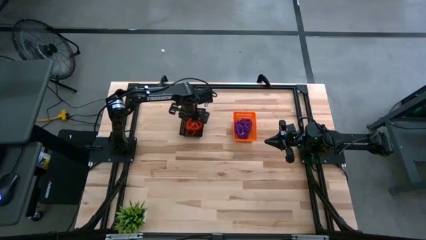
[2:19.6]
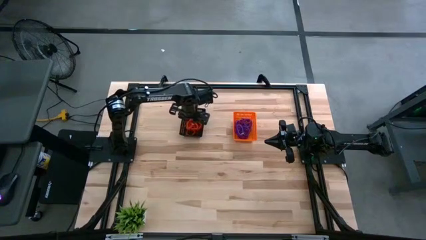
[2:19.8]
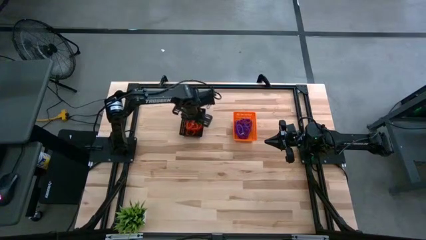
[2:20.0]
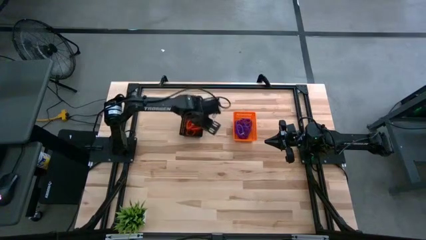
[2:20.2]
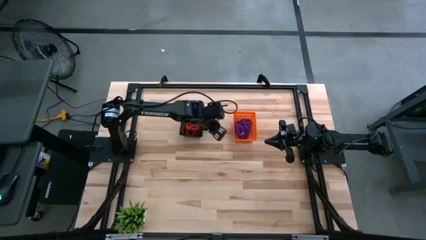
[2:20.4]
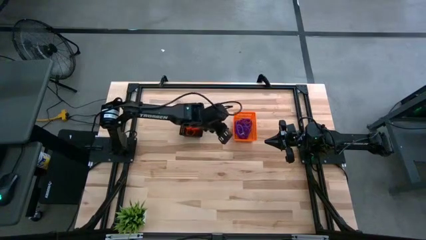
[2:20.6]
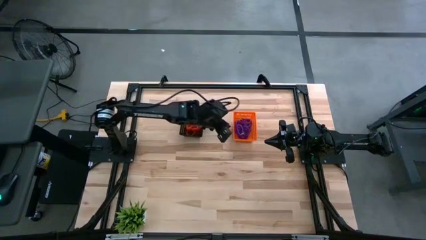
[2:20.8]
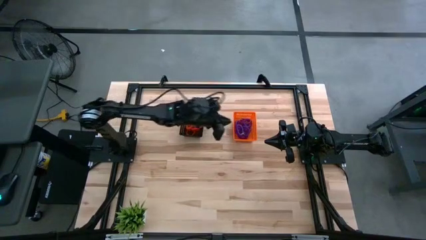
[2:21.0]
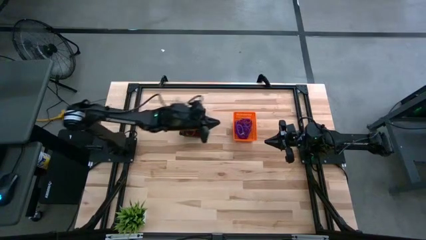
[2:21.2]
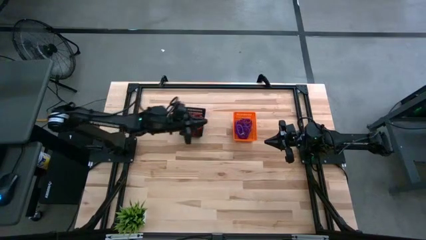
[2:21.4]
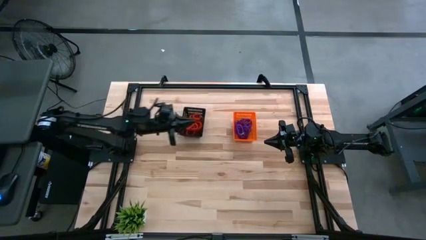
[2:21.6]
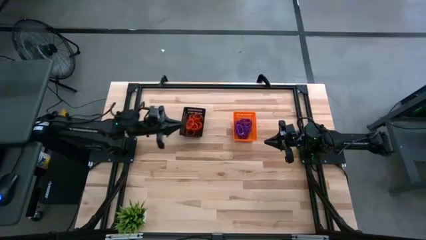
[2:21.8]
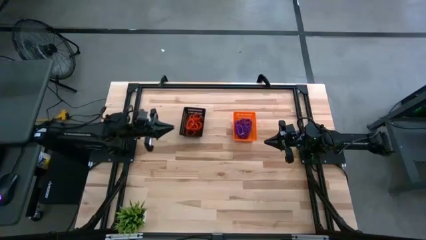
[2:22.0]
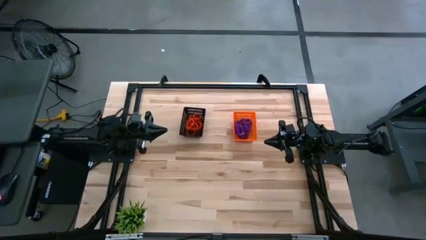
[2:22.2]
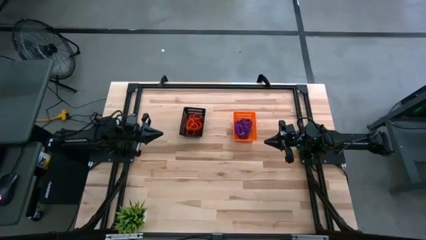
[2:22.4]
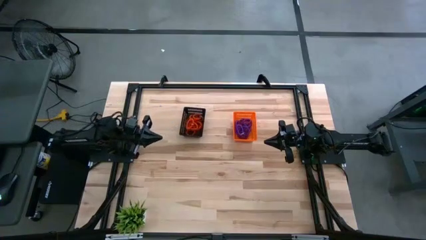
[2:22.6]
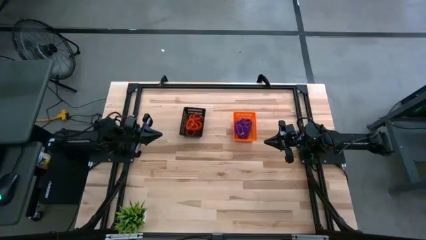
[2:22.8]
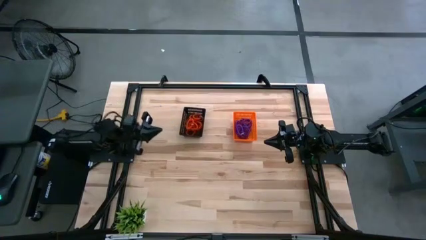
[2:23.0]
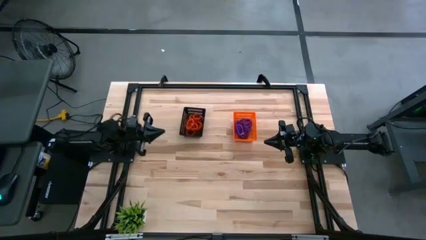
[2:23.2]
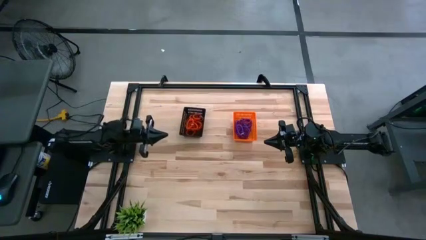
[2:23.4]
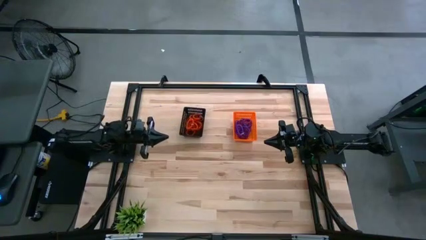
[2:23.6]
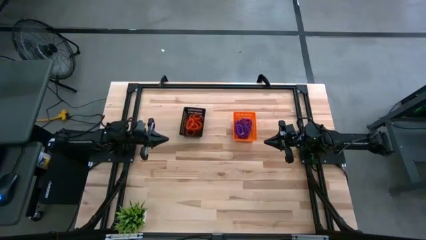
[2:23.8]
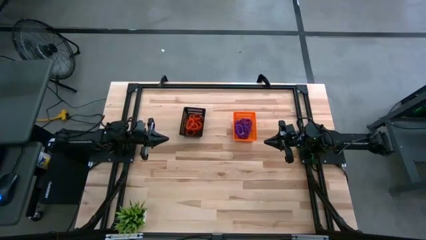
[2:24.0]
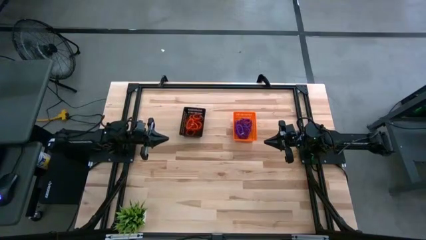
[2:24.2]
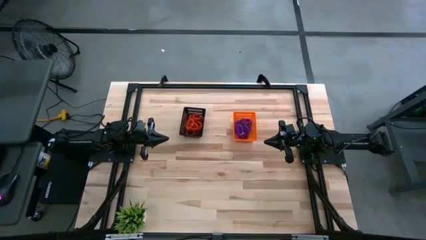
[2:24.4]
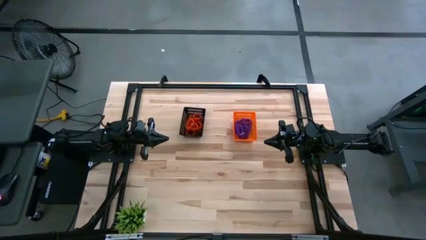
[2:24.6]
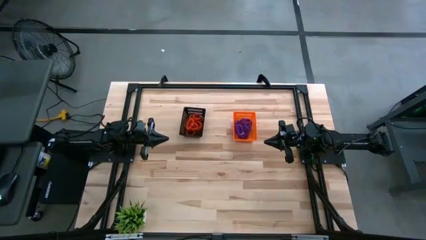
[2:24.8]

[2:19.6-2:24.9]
Task: Sort spring keychains into baskets
Return to Home Position

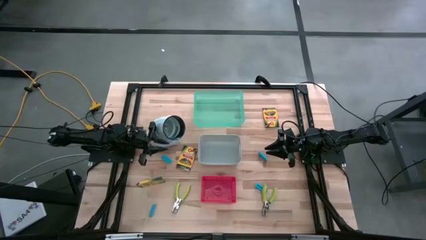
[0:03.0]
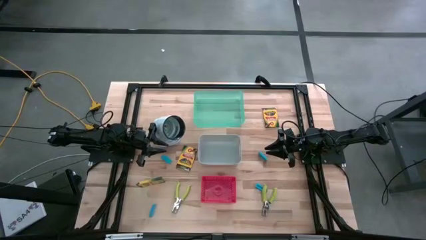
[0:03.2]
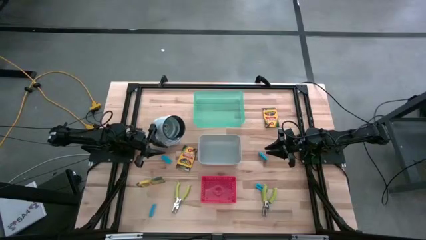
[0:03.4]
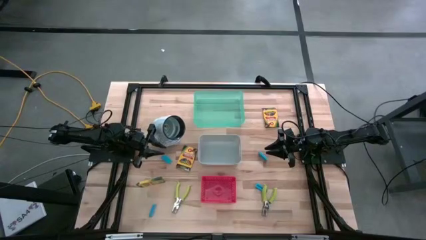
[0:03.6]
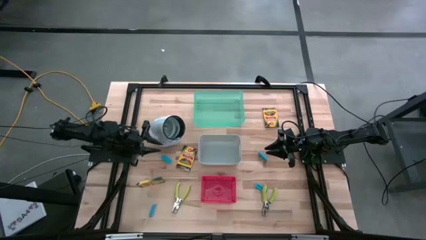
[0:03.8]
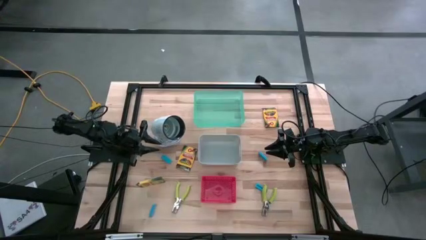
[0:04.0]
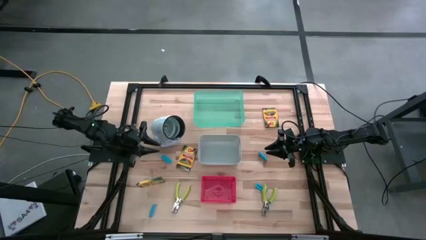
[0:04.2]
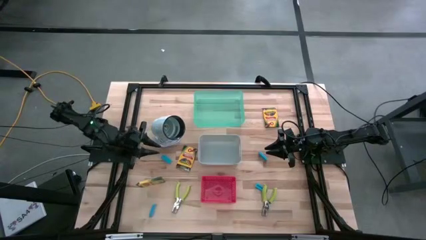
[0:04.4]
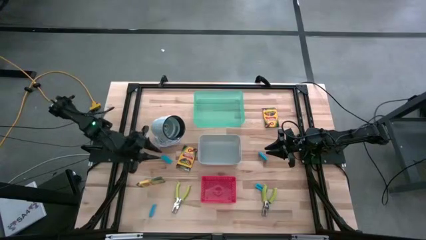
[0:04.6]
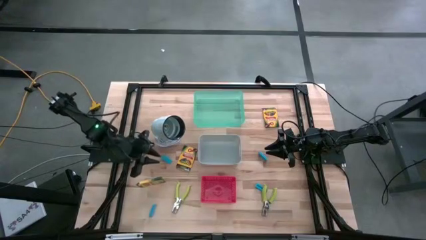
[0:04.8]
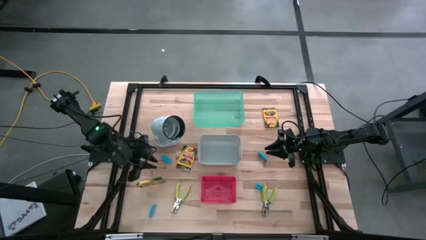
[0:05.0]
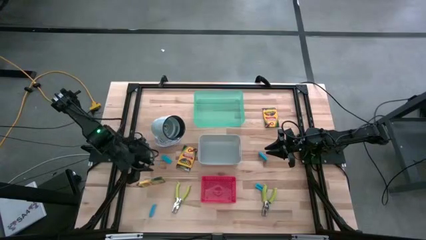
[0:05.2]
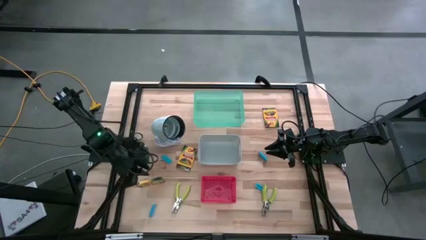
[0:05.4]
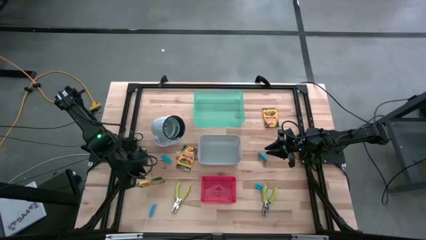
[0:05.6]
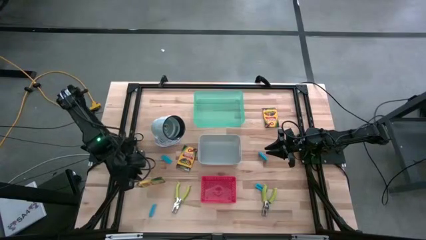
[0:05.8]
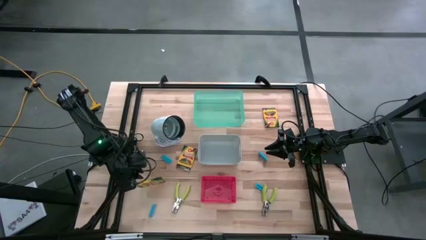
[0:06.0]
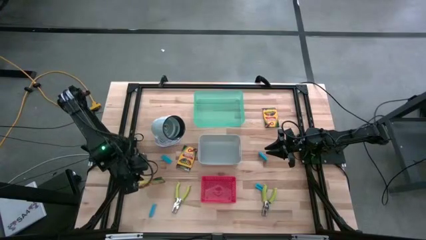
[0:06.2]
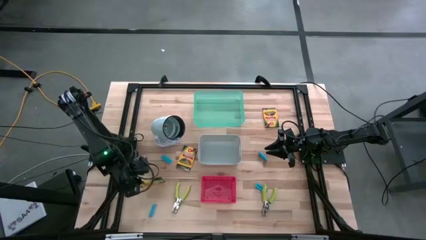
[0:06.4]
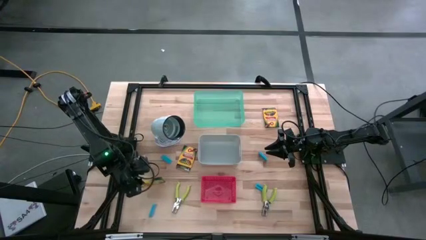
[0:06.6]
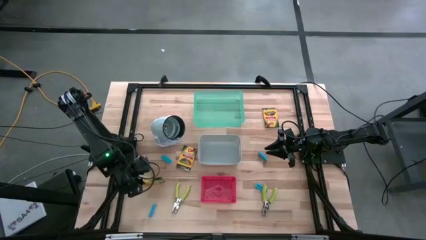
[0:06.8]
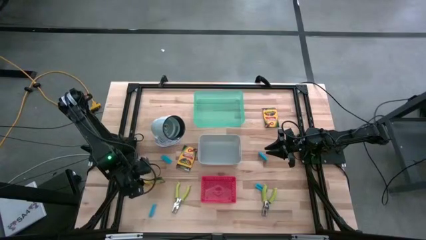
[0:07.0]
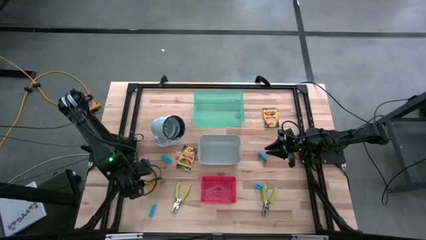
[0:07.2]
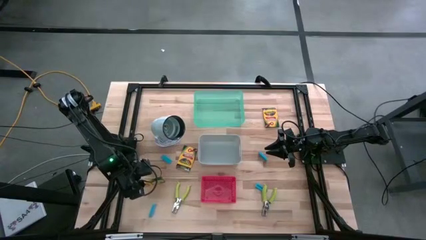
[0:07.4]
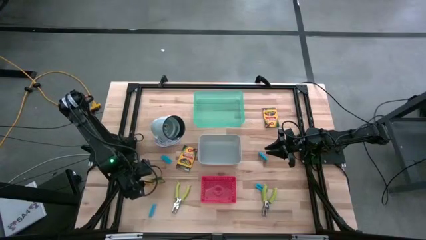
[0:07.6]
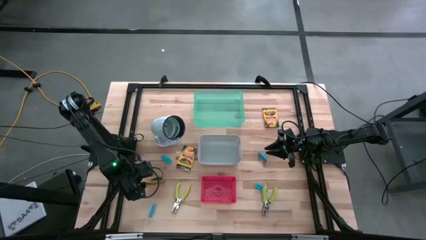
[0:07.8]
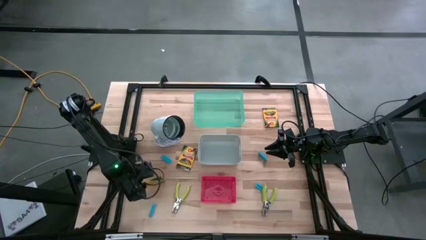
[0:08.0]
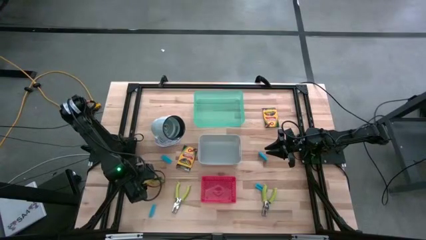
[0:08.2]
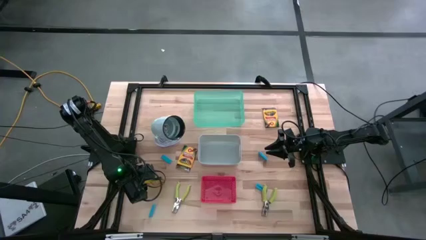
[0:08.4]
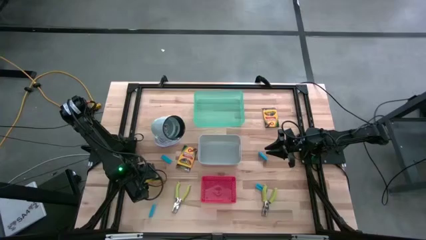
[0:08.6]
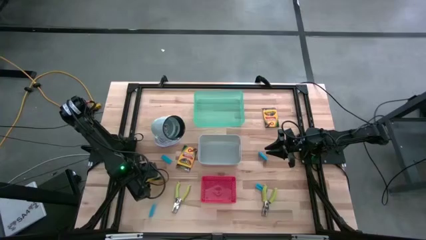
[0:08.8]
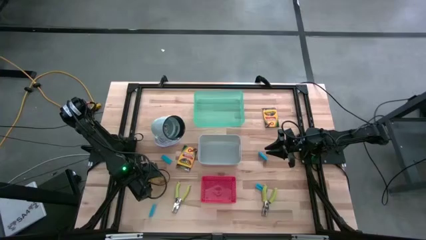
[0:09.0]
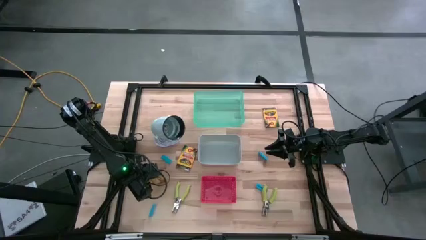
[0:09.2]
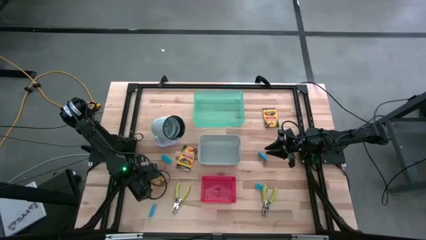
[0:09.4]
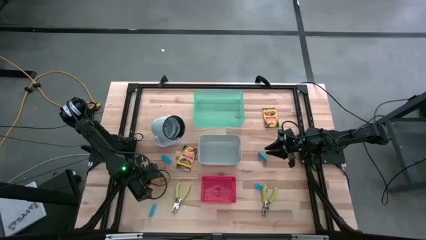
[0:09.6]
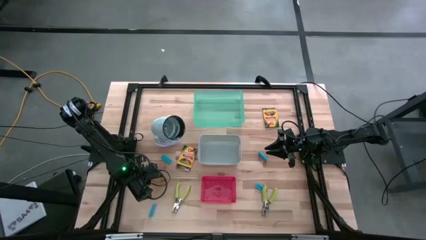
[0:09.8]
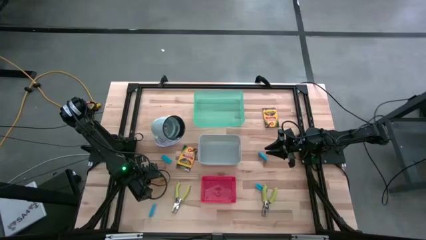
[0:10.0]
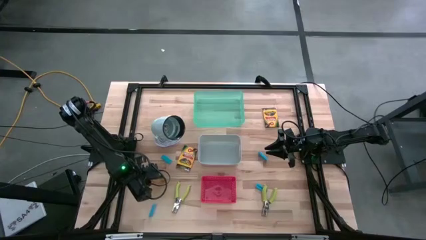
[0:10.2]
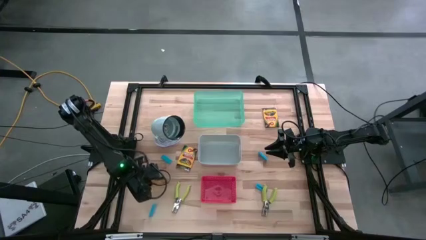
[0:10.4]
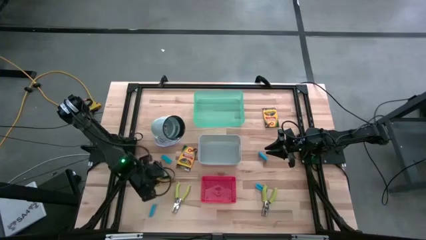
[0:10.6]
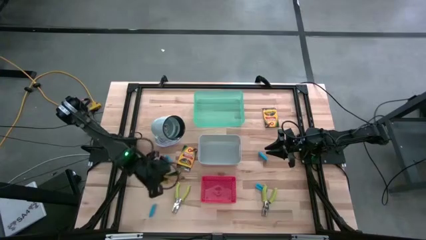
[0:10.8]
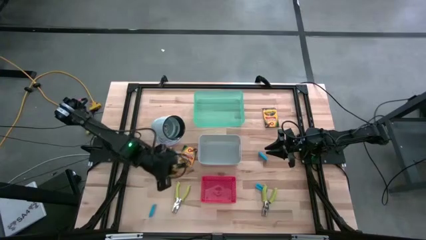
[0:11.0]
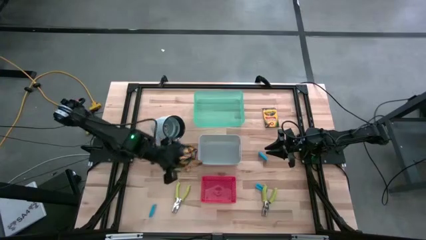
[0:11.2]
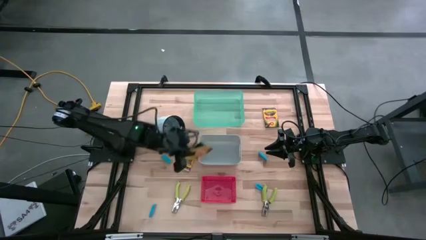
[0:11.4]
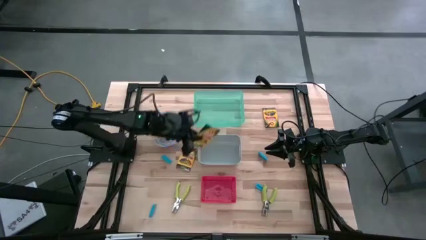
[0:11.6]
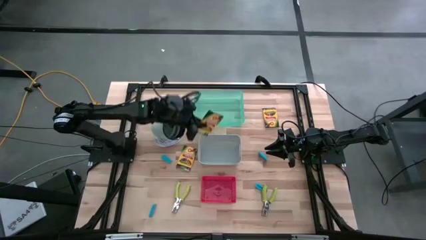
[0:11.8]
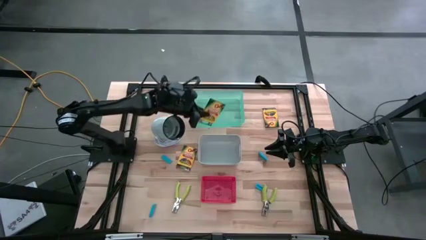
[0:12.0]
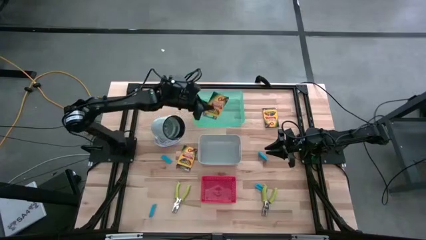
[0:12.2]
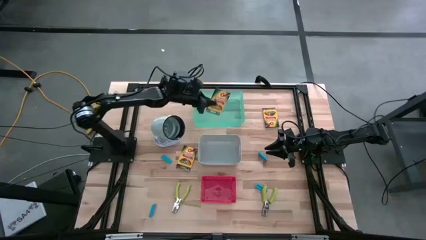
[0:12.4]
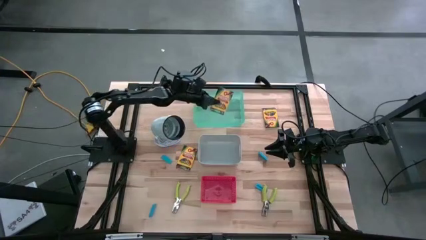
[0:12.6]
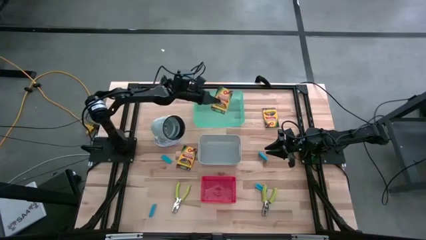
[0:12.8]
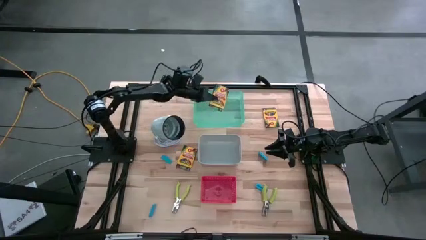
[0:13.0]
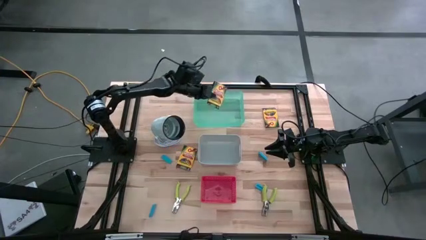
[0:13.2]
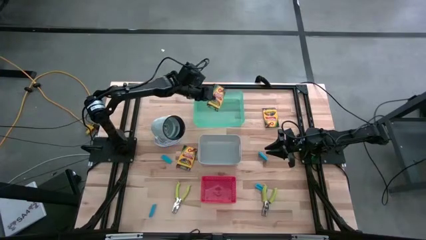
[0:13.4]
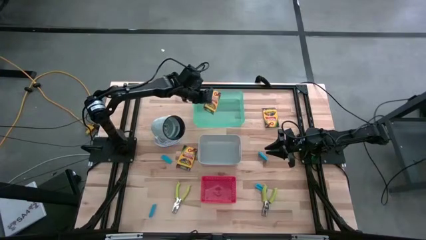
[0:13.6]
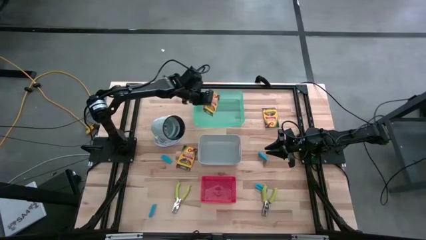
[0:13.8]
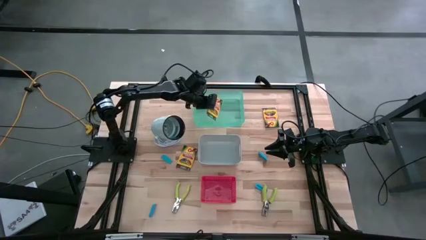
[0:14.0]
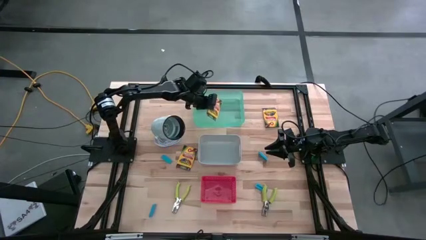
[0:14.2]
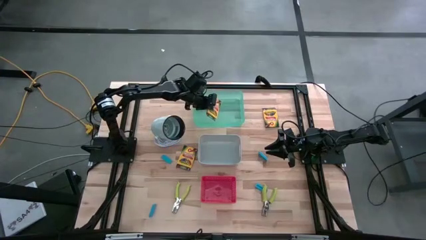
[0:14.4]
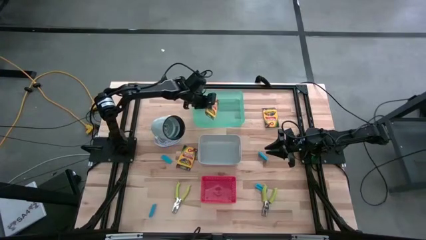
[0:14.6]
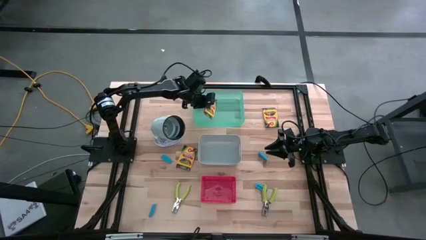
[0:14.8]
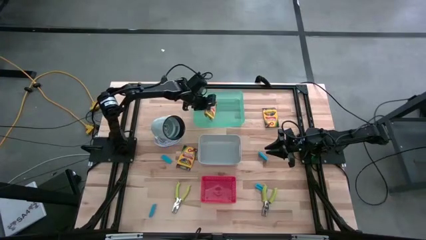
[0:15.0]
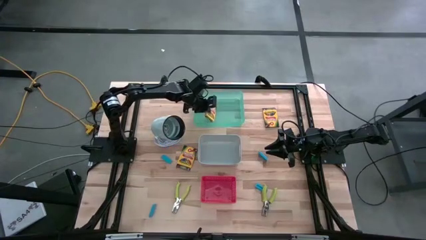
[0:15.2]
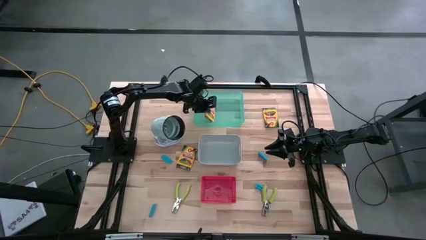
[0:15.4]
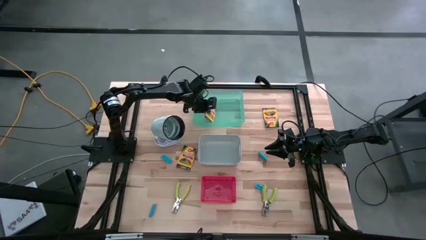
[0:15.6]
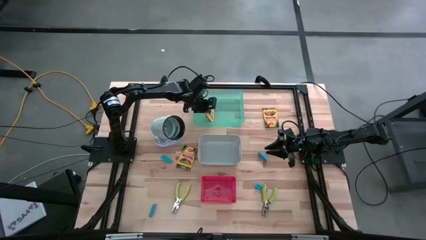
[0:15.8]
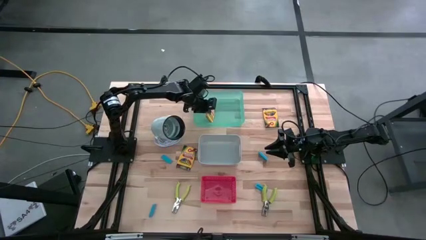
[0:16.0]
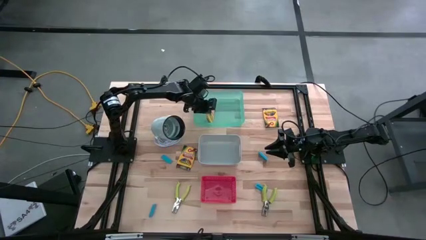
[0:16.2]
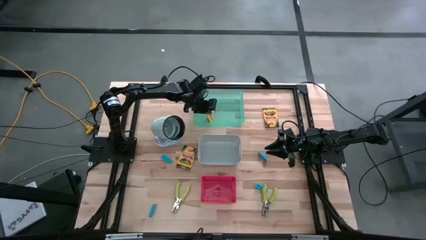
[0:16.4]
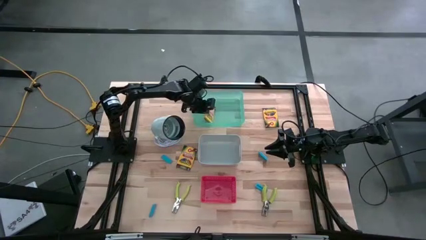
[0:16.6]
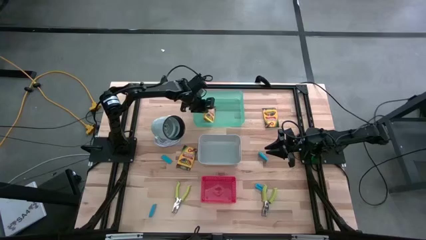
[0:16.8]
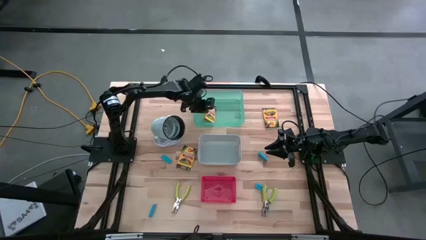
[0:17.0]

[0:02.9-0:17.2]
Task: Pick & Place School Supplies
Put the bottom yellow crayon box into the green bin
